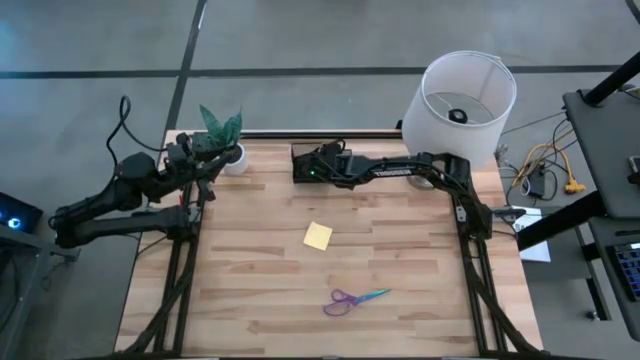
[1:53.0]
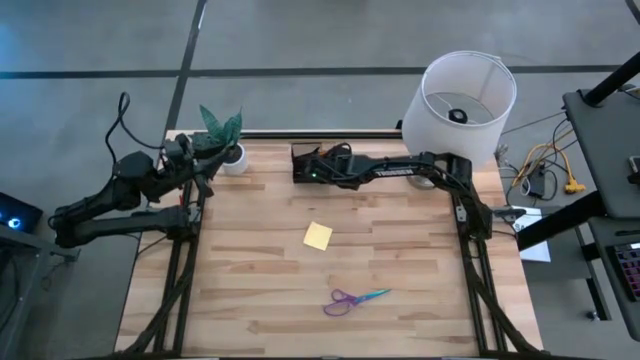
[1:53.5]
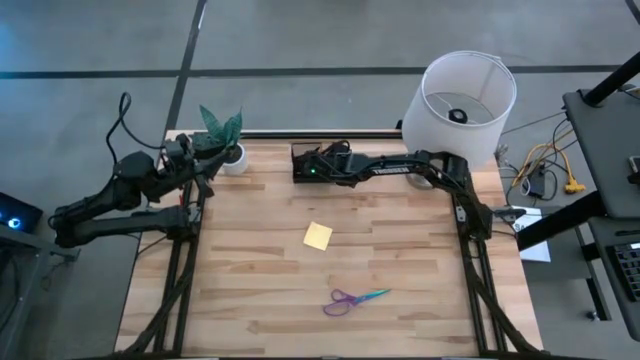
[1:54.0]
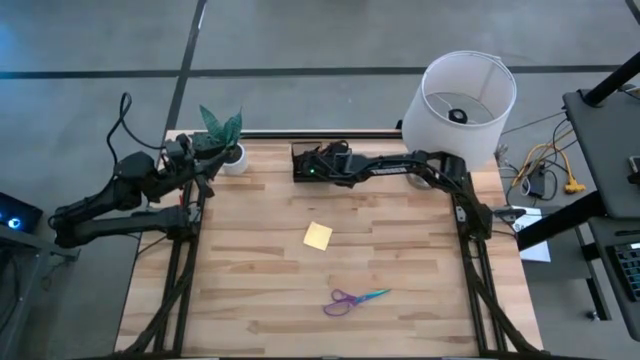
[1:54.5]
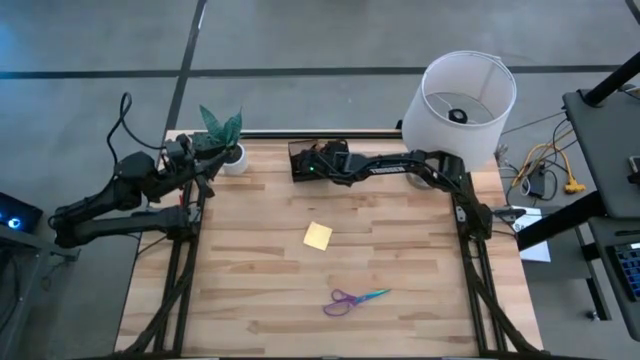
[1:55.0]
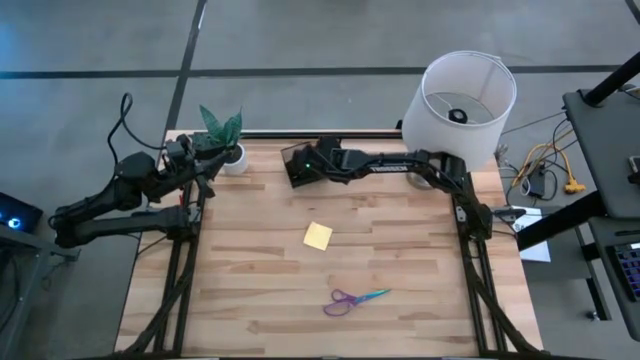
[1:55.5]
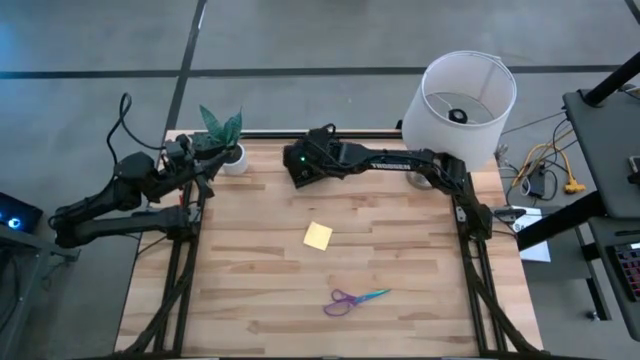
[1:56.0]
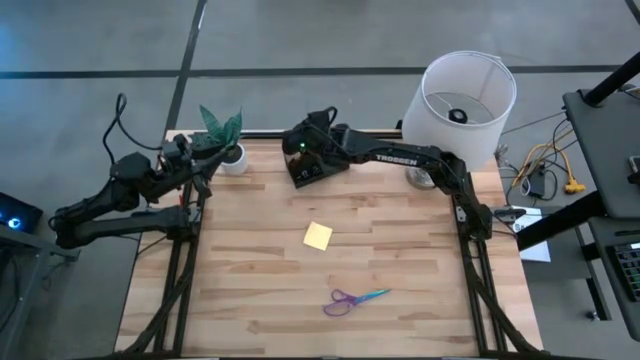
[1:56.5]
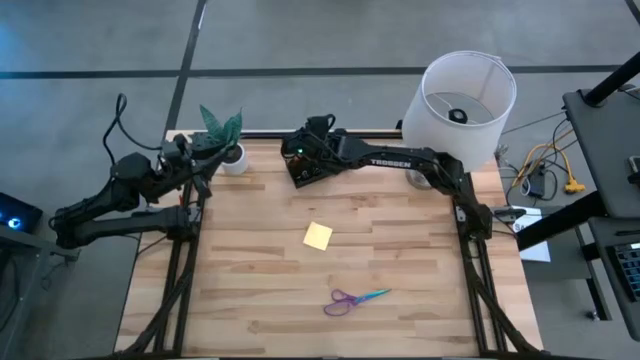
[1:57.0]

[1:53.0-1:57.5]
Task: Pick and place office supplies into organizer
Put the black pen into the black desk organizer

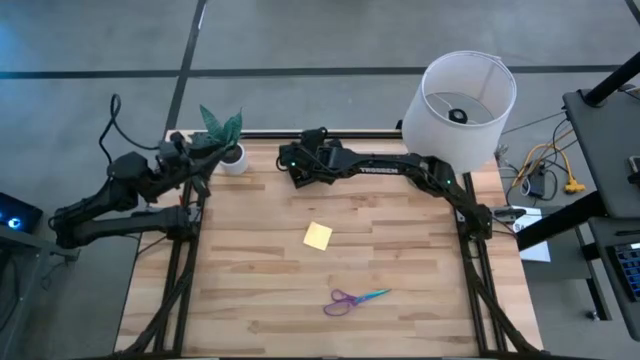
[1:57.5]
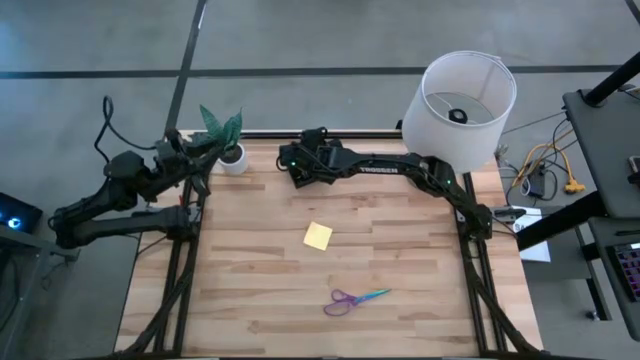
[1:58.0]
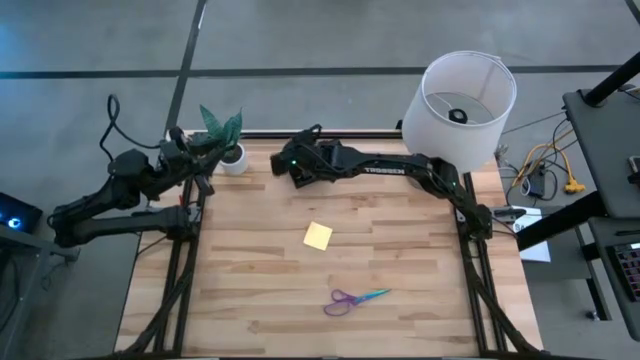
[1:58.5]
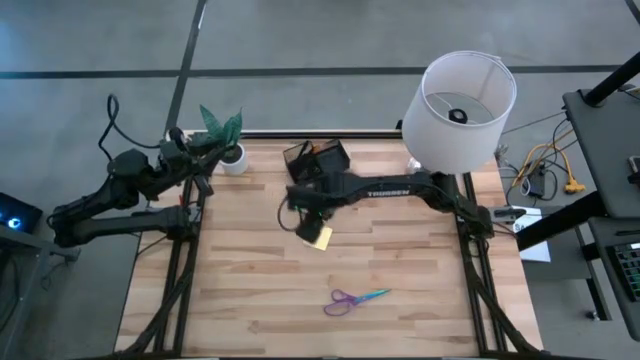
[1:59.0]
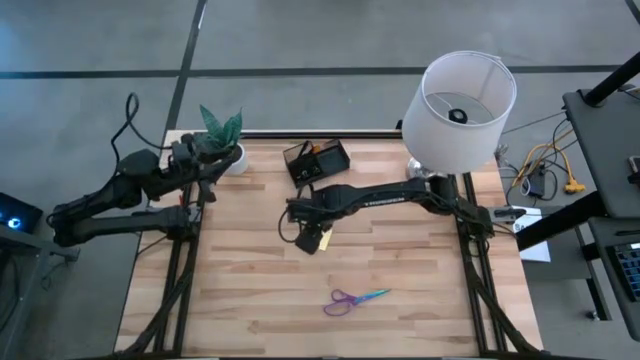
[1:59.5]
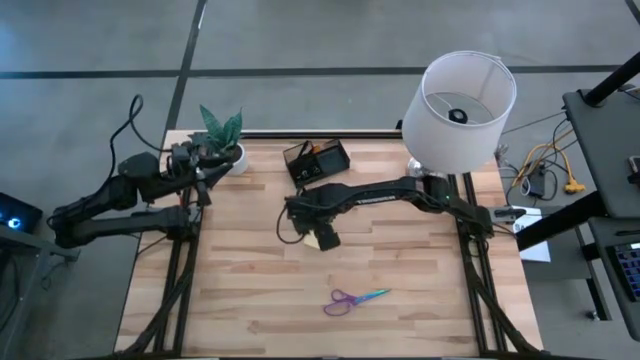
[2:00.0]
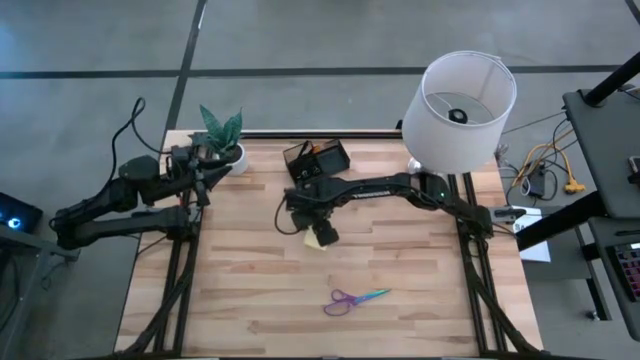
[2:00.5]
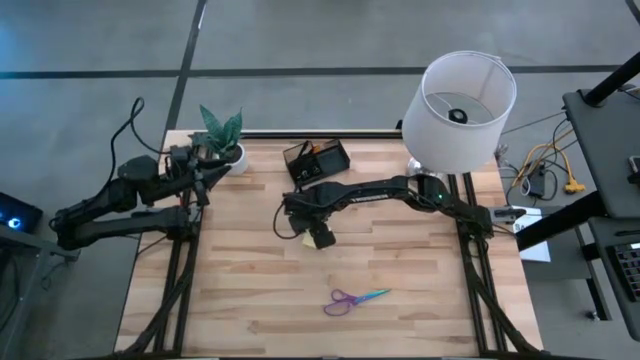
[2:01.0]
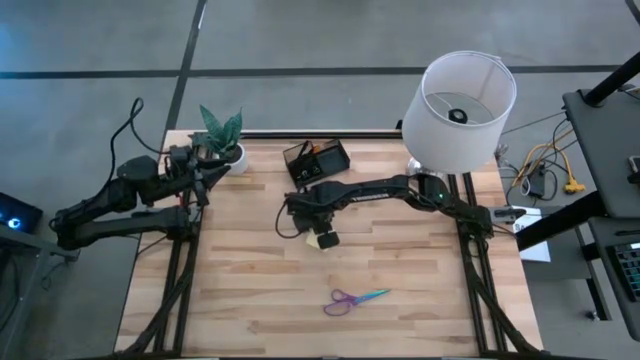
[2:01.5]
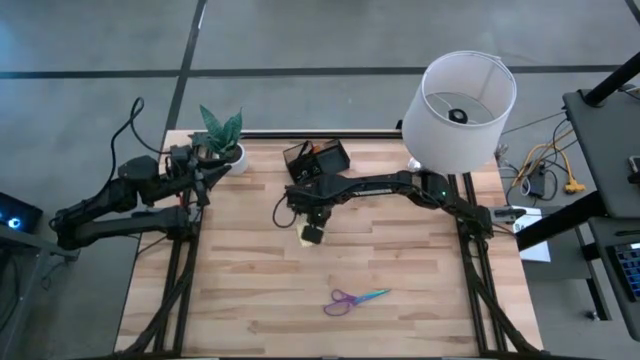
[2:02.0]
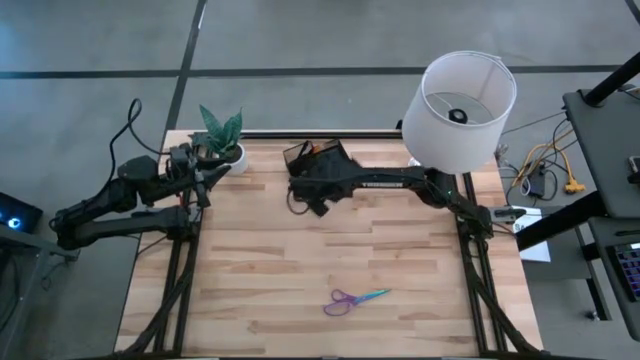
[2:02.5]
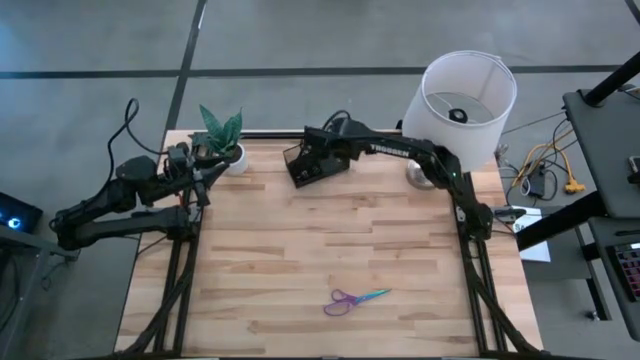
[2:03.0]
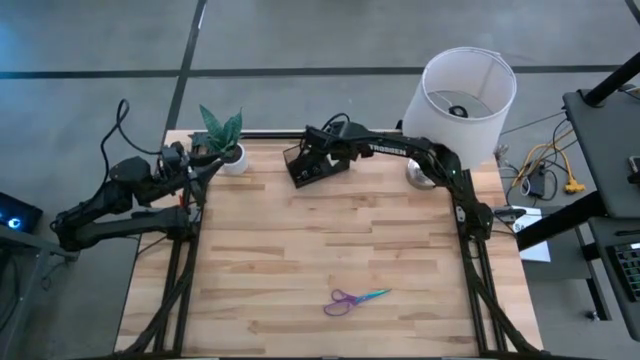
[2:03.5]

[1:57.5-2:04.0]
Put the yellow sticky note into the black desk organizer

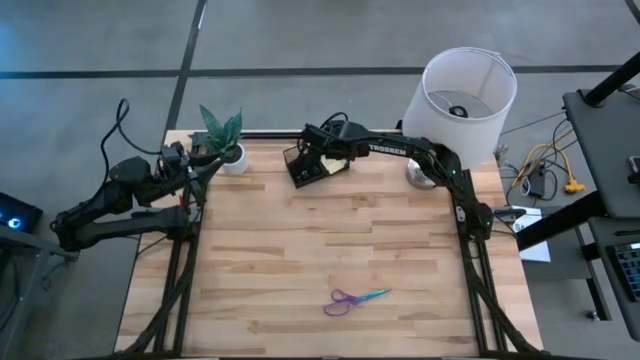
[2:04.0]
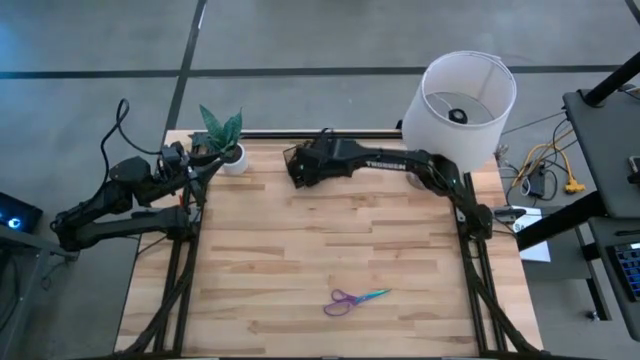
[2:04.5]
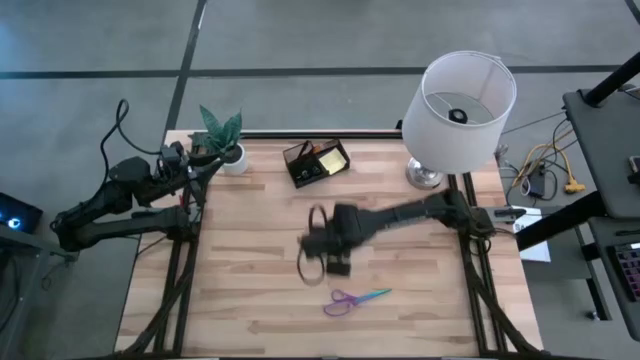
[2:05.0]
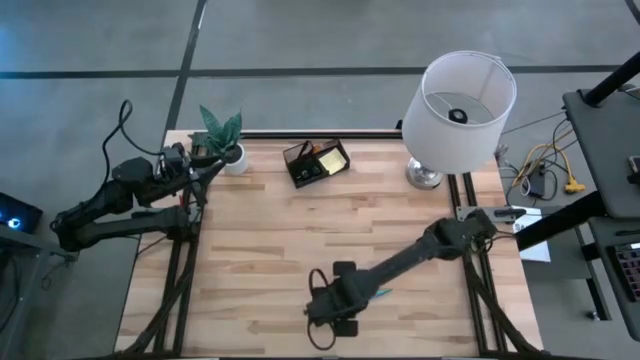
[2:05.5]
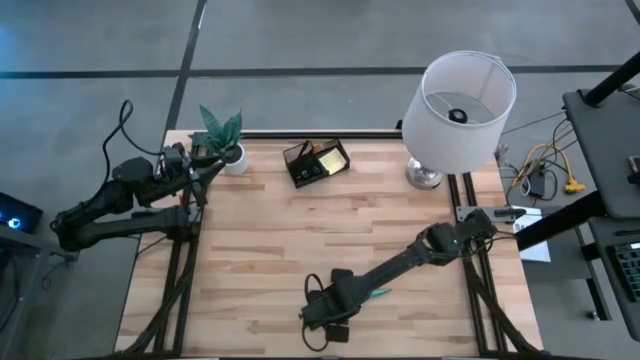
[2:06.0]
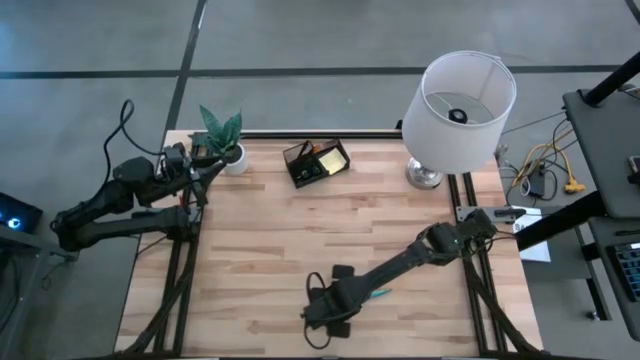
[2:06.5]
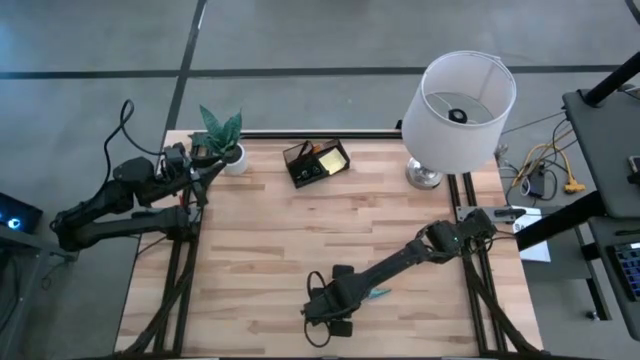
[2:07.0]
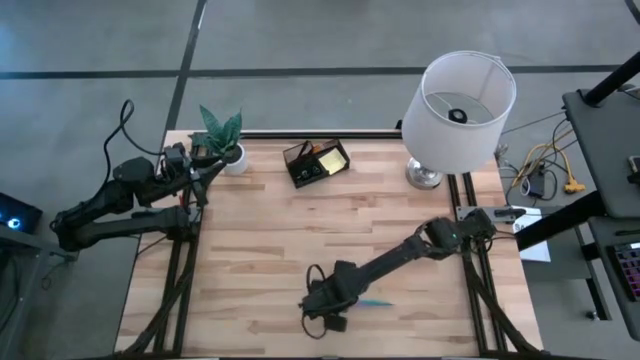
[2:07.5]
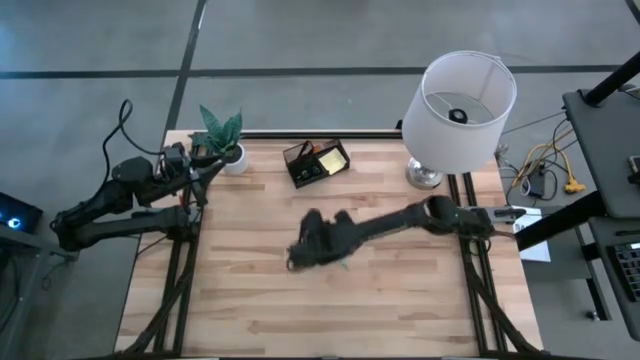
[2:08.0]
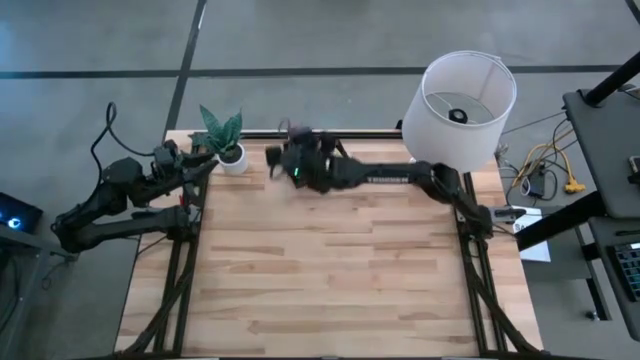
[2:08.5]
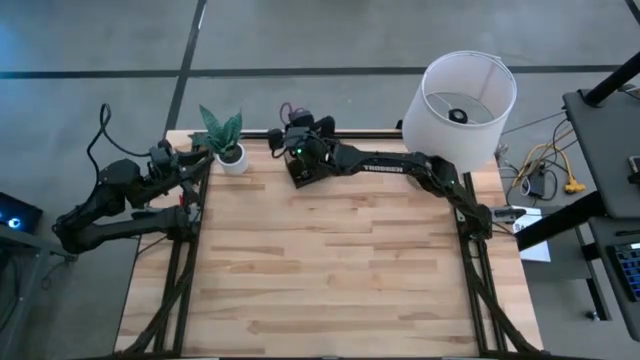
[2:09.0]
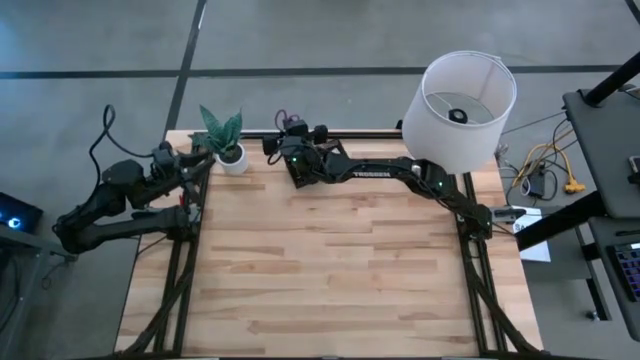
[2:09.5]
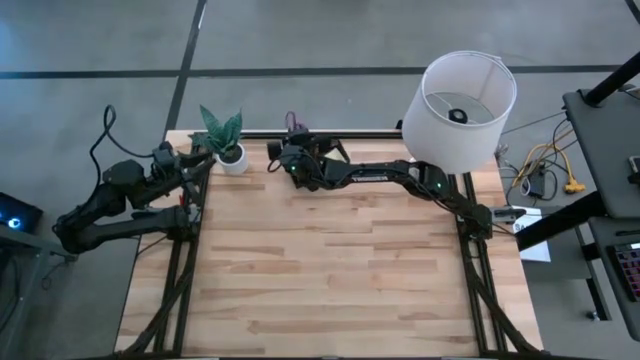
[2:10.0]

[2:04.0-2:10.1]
Put the purple scissors into the black desk organizer

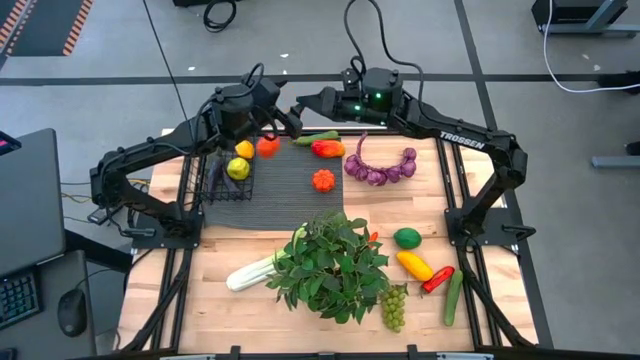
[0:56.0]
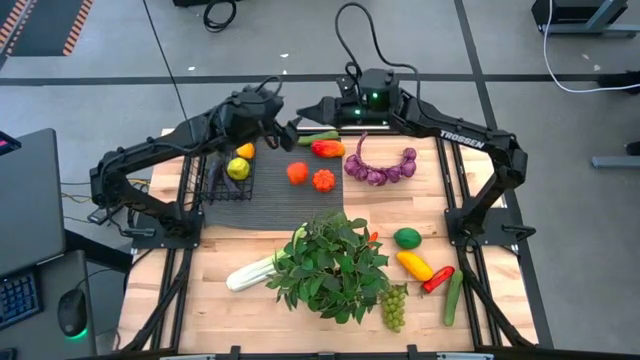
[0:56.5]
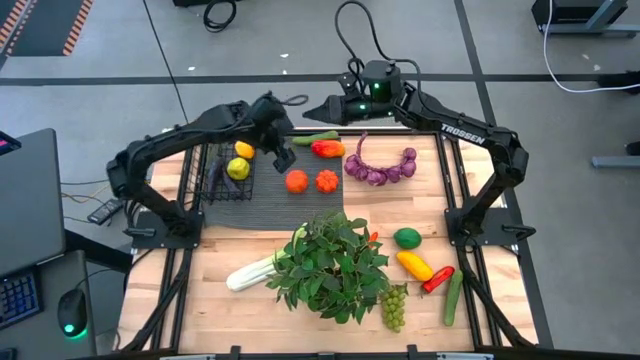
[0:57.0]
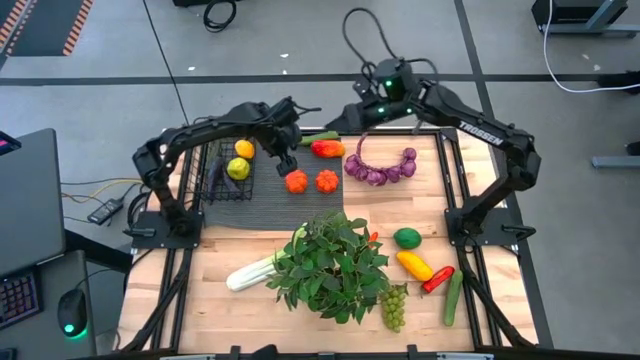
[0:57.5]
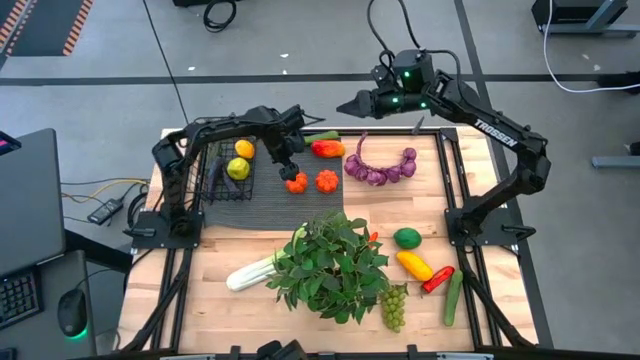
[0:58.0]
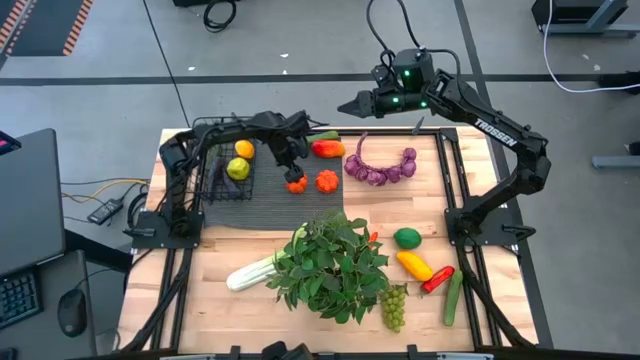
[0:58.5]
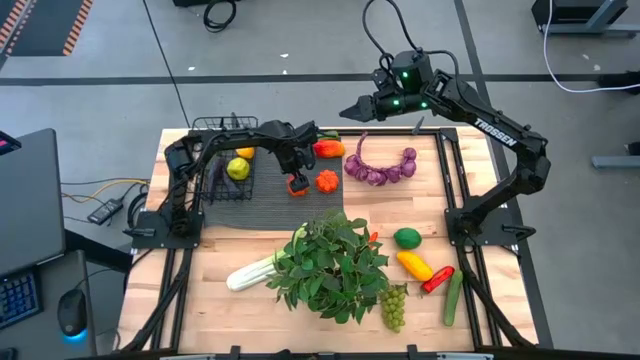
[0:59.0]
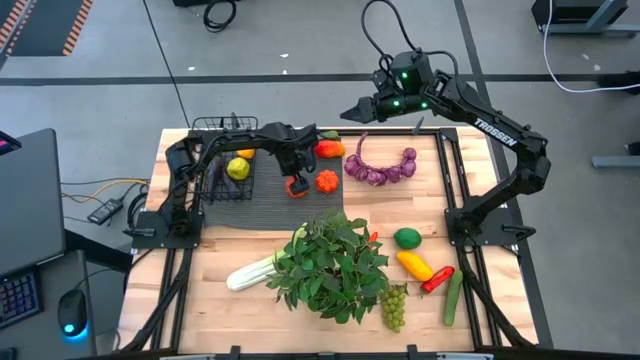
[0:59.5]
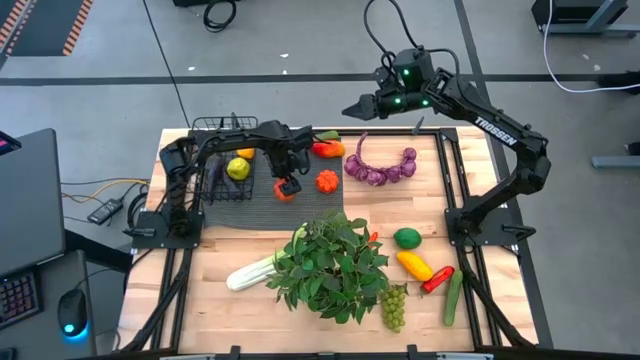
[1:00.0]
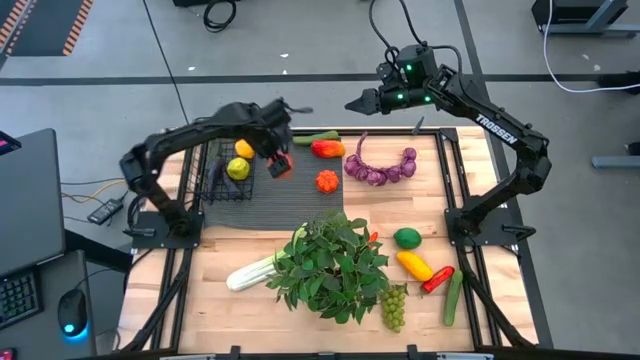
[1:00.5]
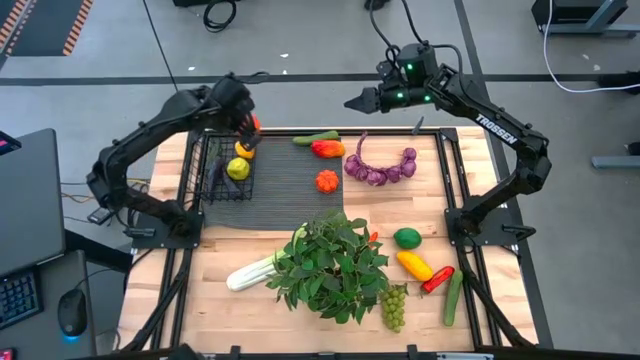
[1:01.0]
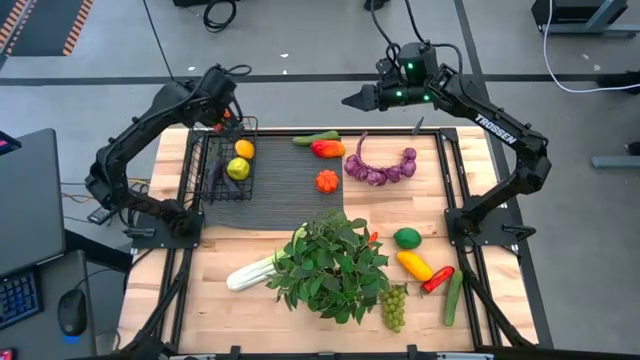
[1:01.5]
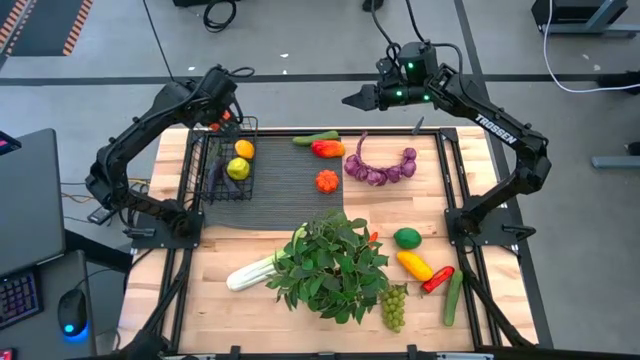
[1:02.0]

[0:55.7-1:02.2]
Task: Build produce basket
Put the left orange pumpkin into the wire basket
